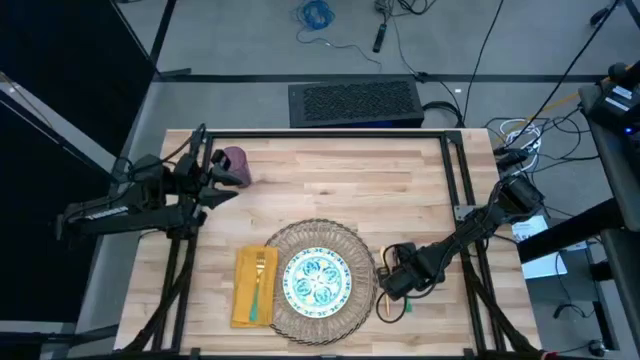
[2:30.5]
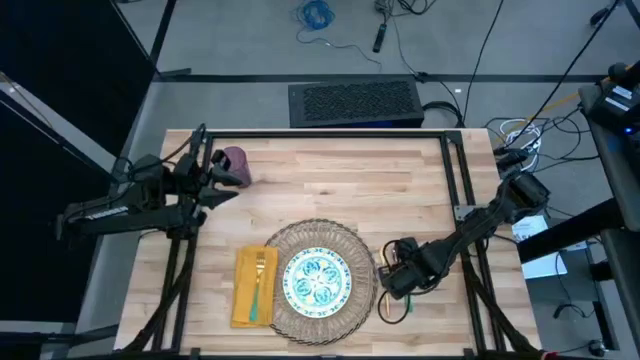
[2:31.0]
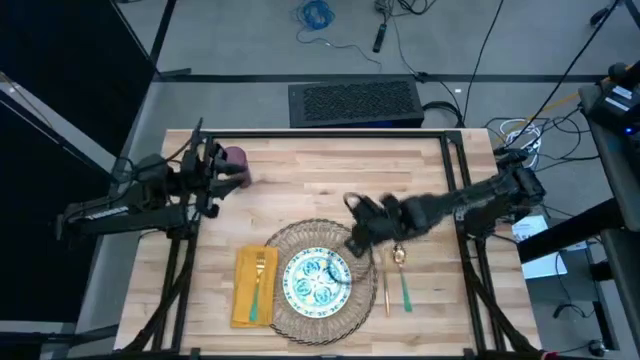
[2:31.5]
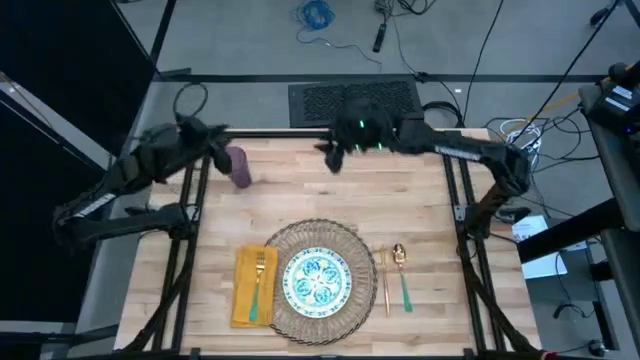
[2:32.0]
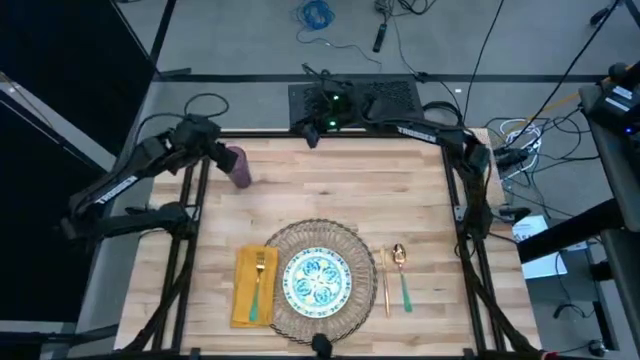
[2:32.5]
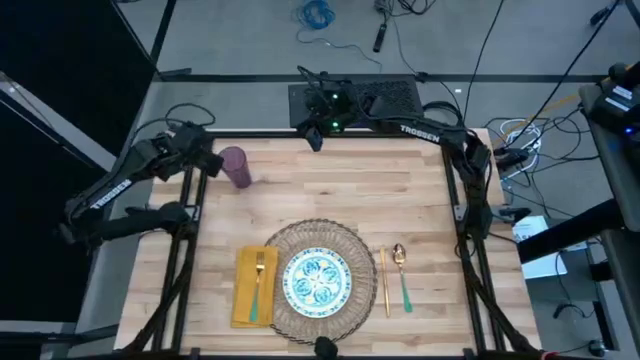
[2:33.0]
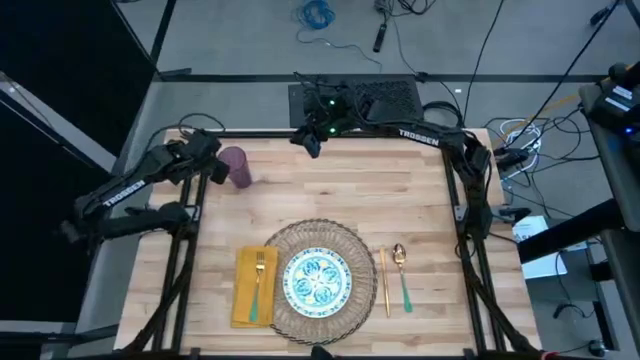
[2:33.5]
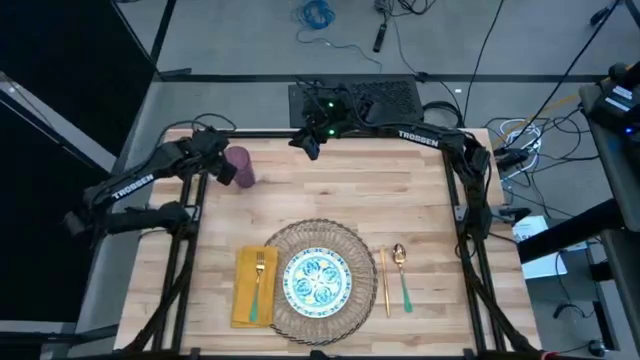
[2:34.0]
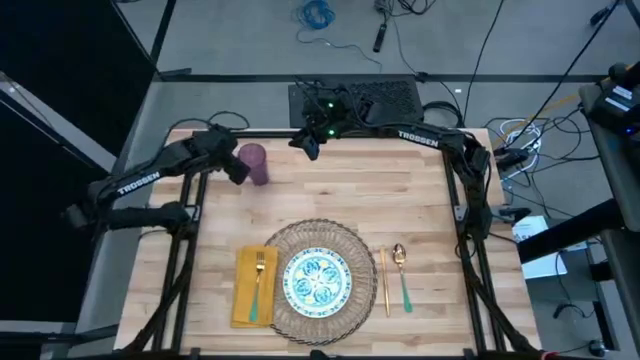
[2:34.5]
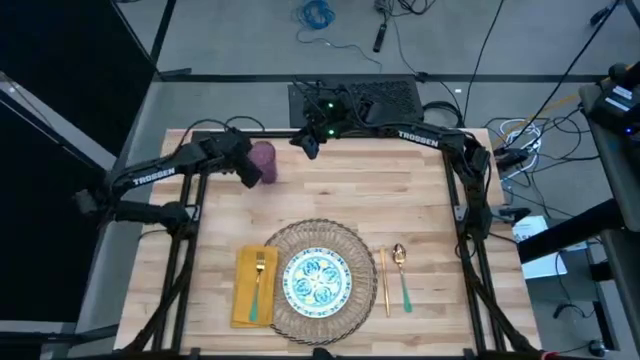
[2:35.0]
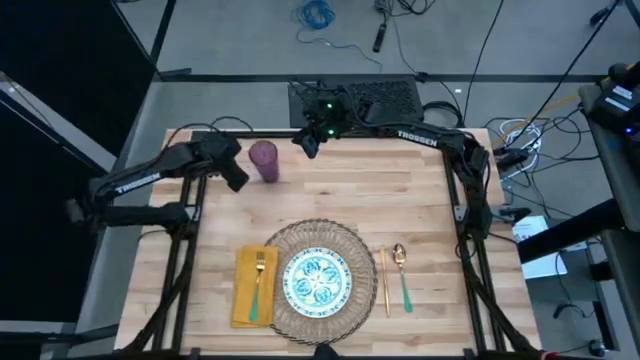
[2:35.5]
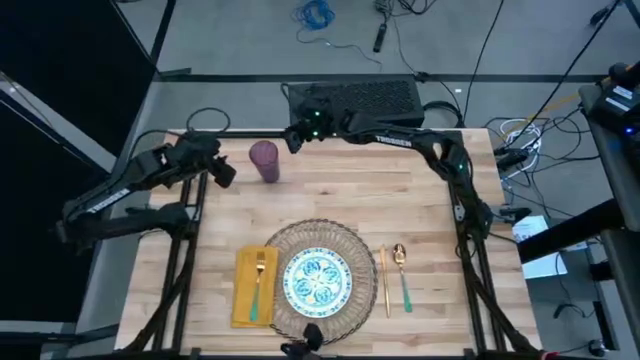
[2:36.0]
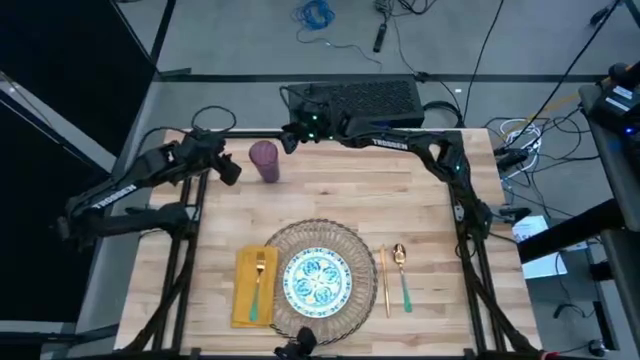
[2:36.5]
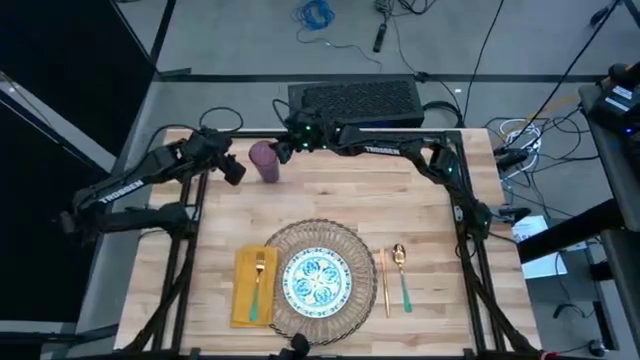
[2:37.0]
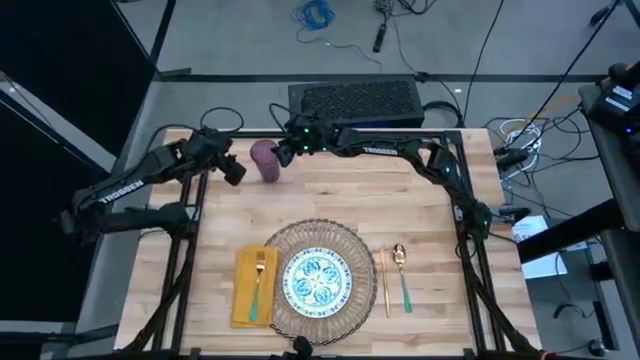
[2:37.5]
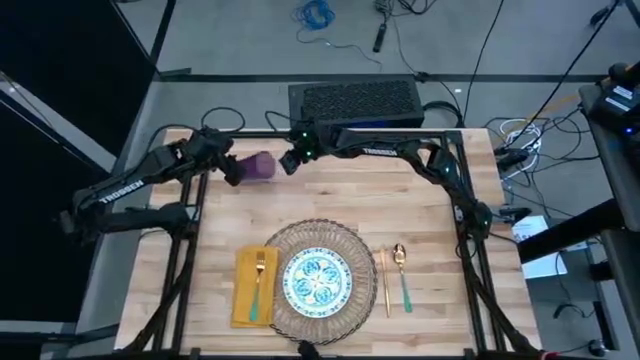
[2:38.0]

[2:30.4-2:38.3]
Task: Set table place
Put the violet cup to the top right of the brown placemat

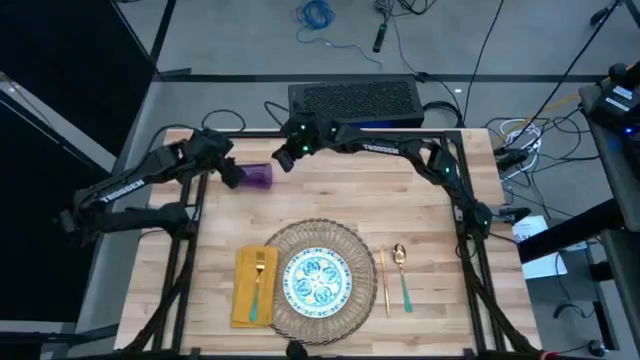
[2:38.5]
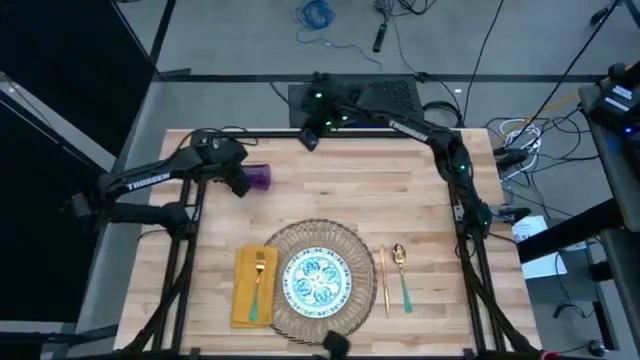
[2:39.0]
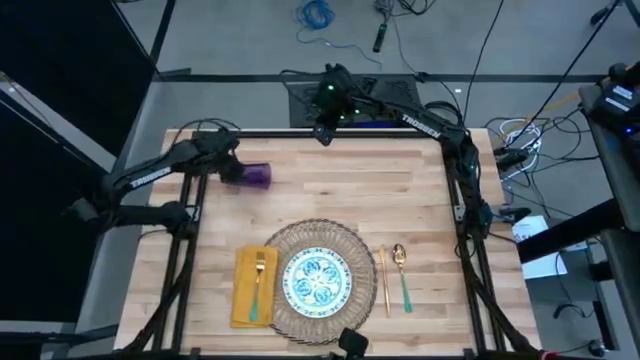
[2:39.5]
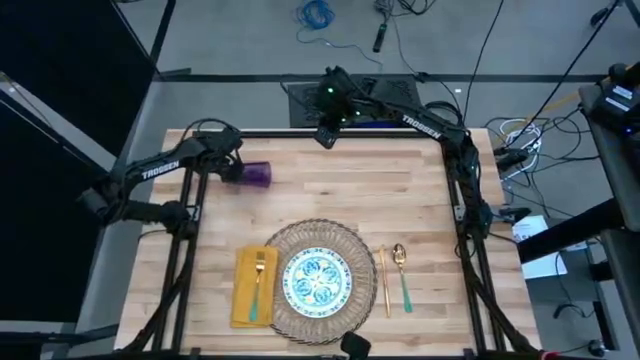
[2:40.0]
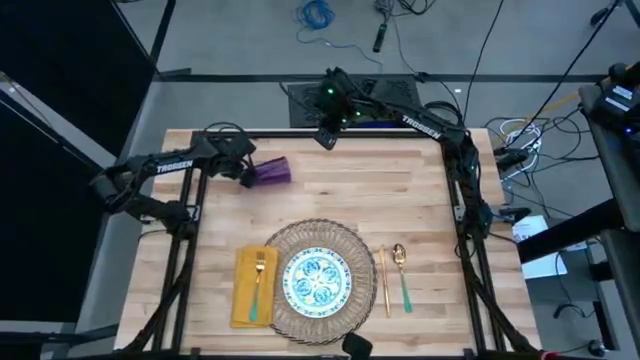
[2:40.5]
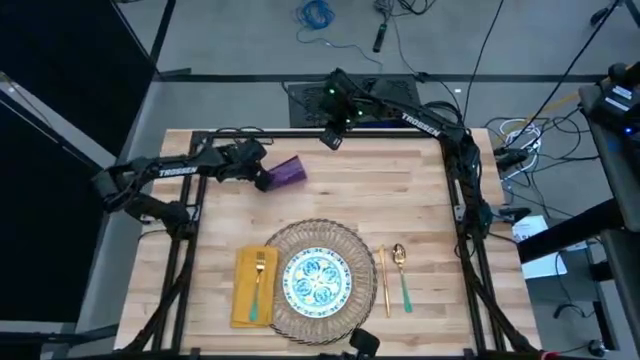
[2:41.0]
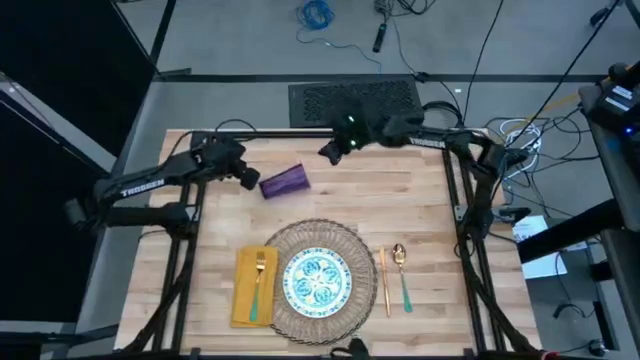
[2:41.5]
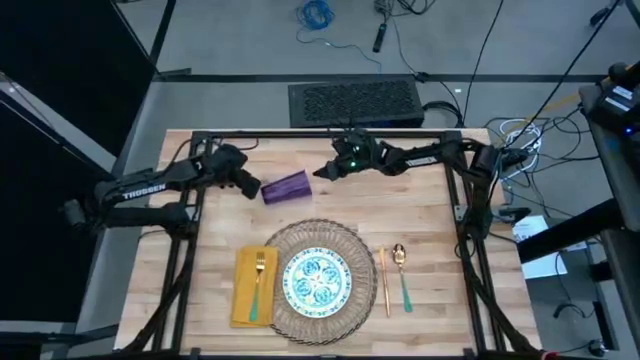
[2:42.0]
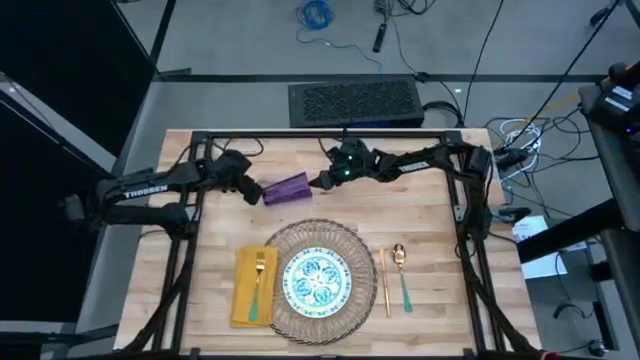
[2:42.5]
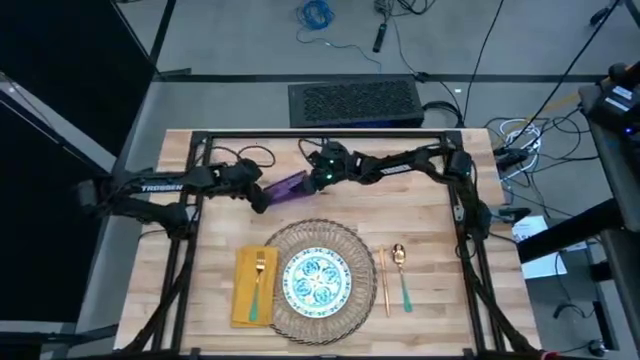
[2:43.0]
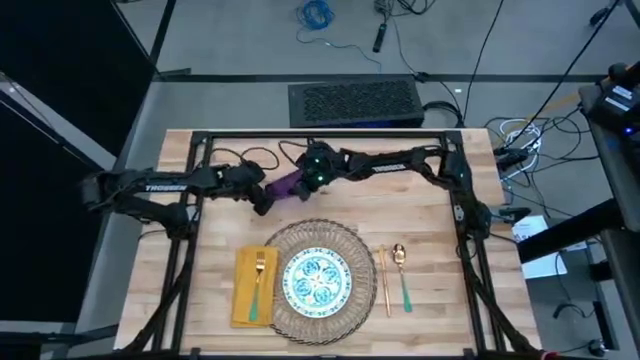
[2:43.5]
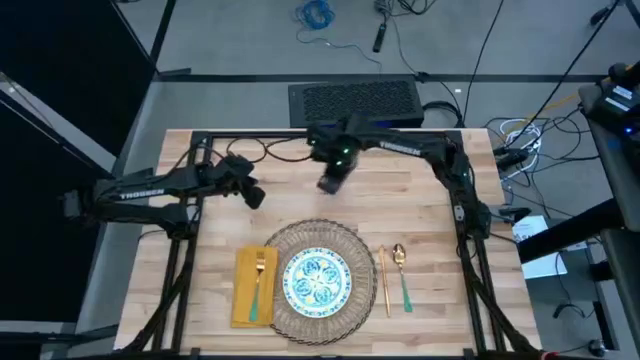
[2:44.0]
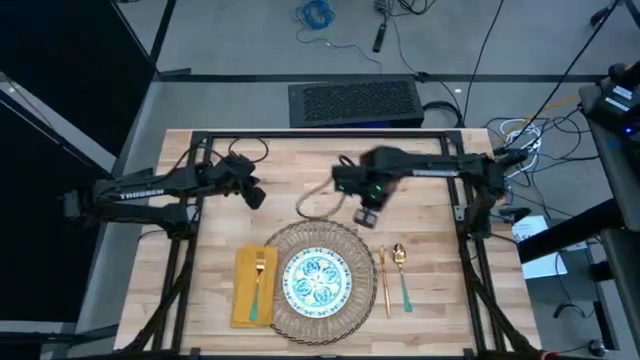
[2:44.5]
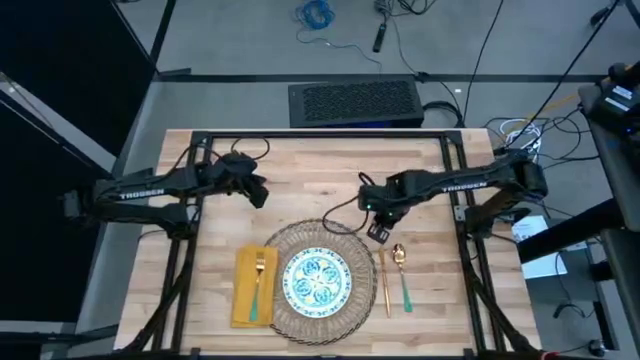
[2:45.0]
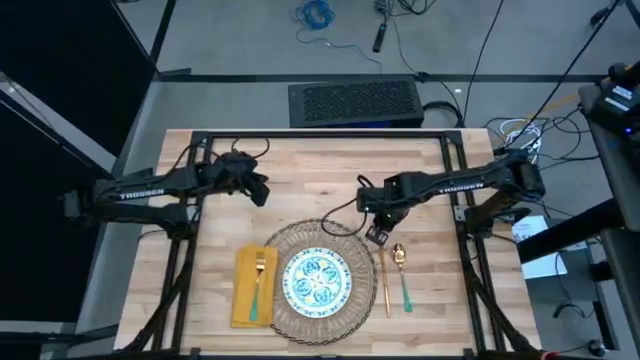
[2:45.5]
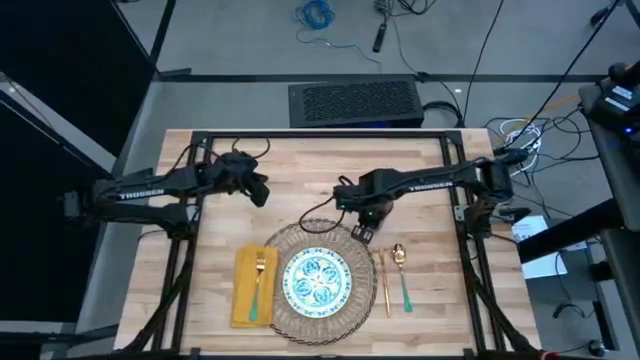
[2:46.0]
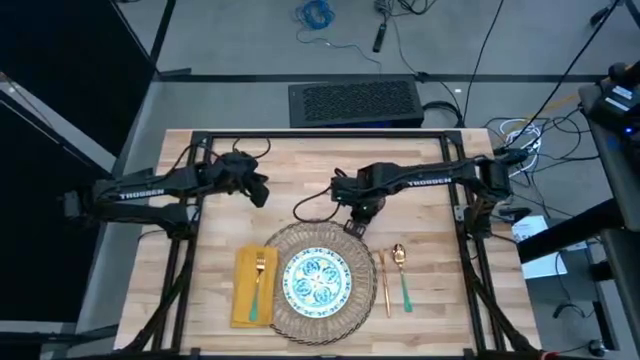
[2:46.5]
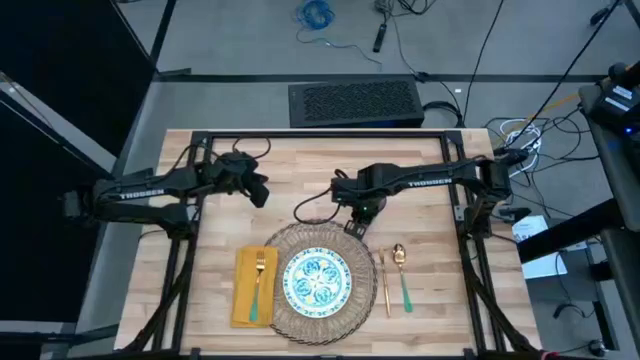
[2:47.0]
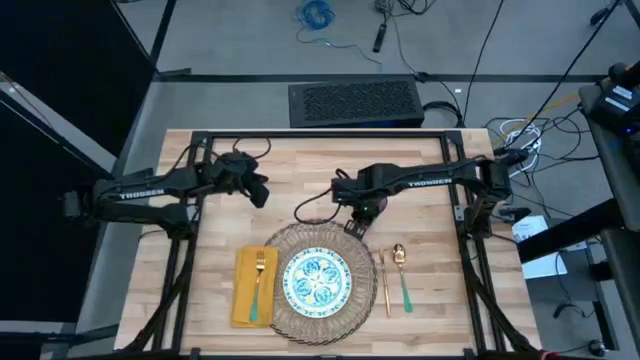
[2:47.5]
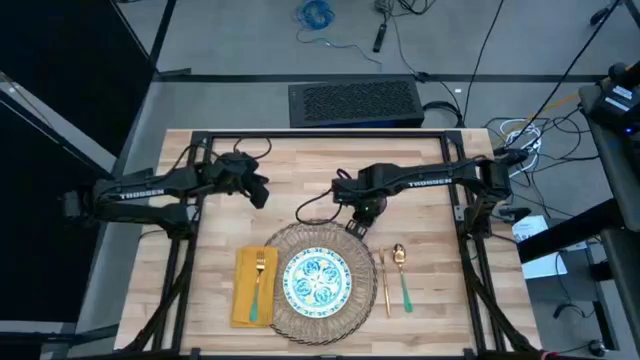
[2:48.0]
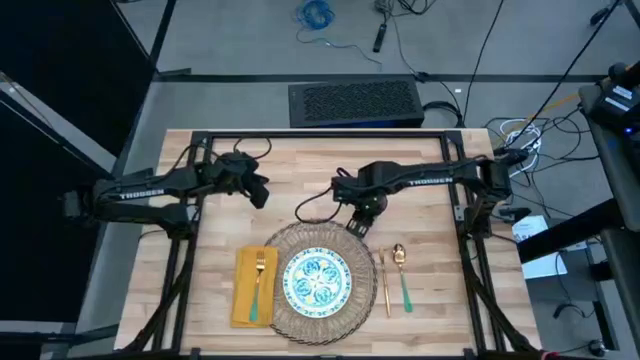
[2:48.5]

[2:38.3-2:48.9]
Put the violet cup to the top right of the brown placemat

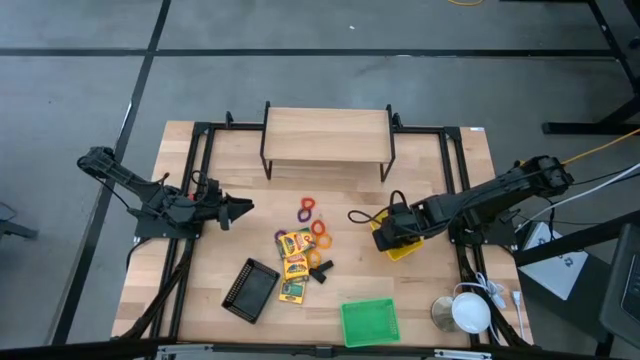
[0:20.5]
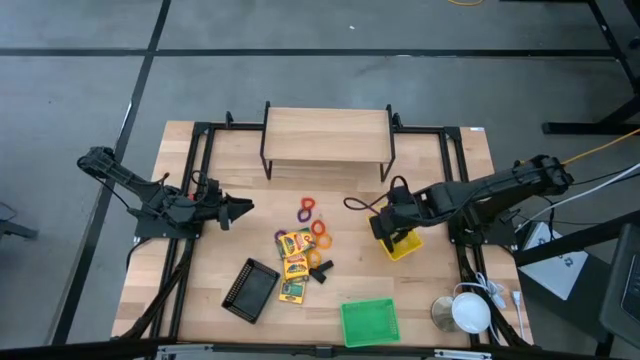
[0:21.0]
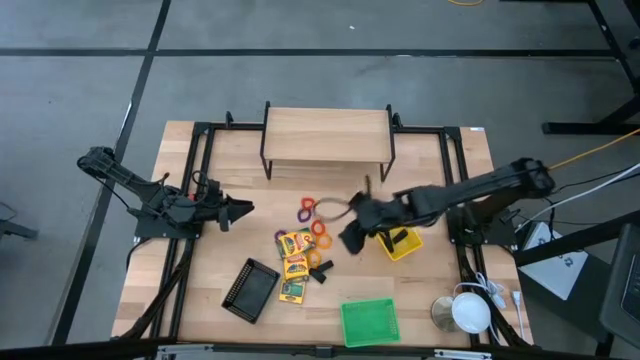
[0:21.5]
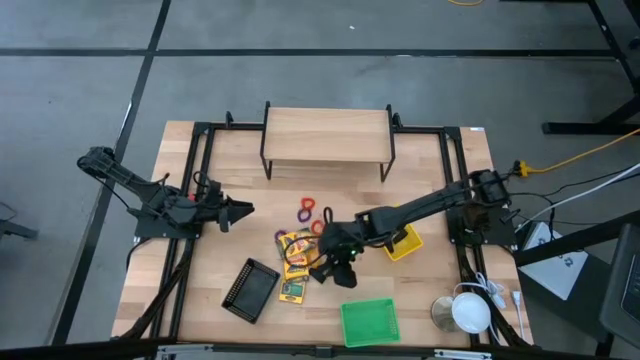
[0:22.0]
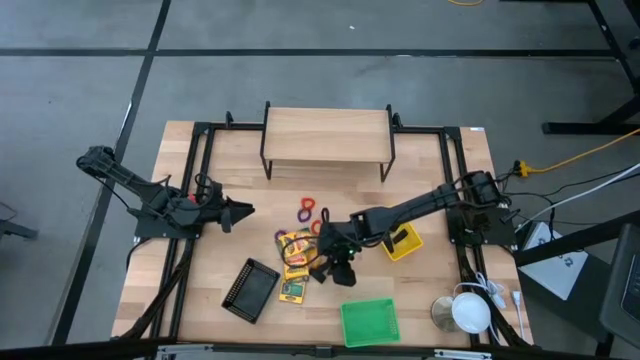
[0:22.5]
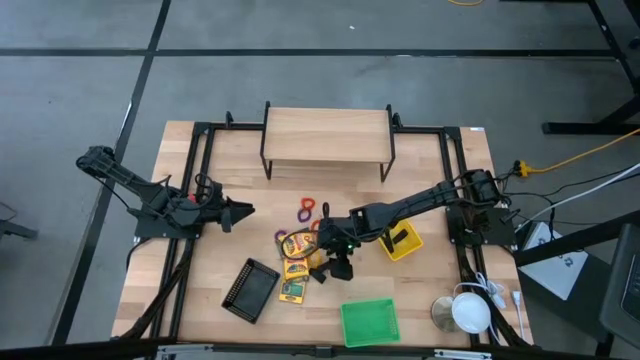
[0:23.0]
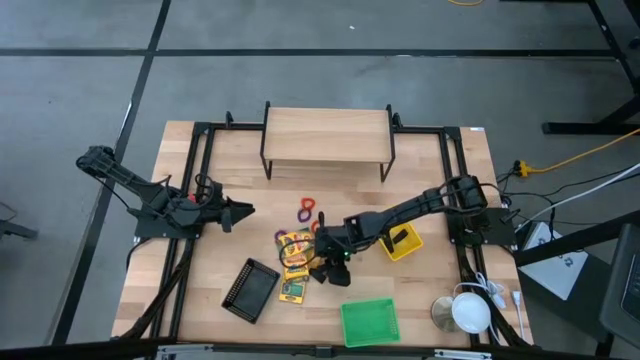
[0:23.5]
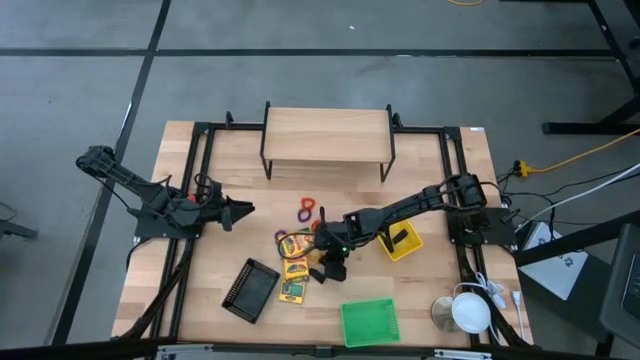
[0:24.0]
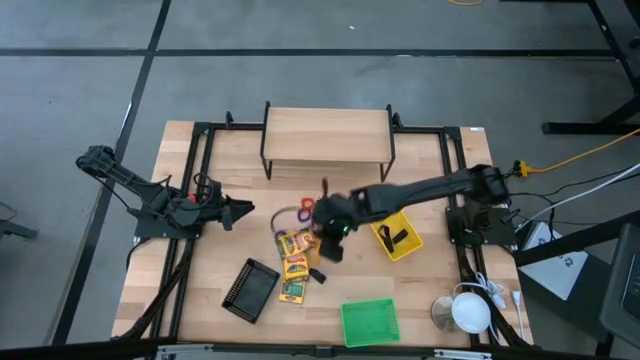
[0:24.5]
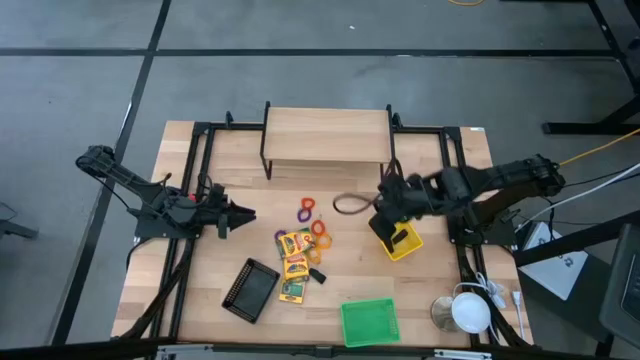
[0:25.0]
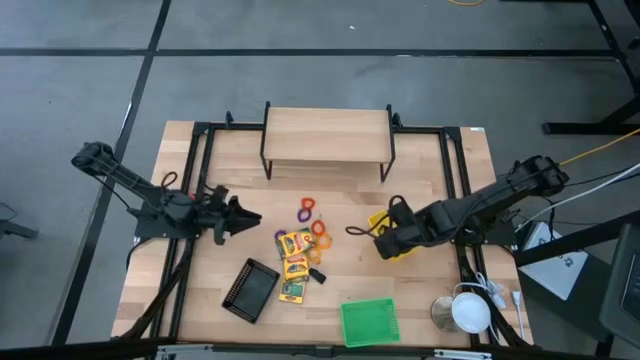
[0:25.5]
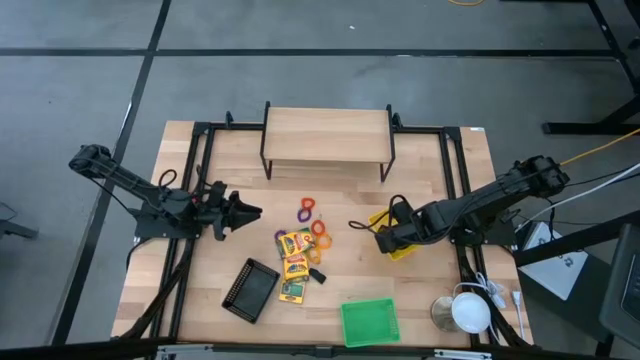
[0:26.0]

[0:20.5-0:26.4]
Task: Pick & Place Office Desk Supplies
Put the black rubber band into the yellow basket
